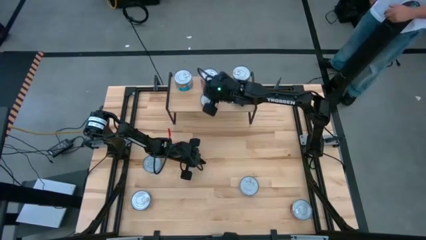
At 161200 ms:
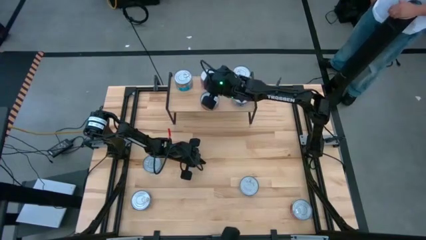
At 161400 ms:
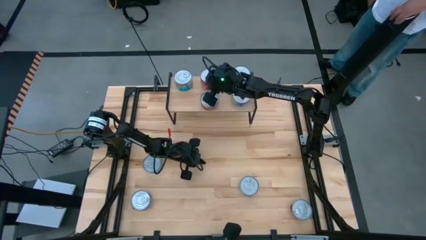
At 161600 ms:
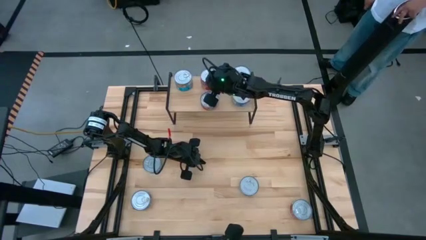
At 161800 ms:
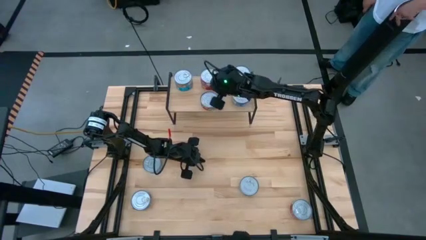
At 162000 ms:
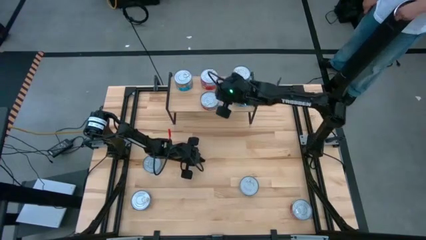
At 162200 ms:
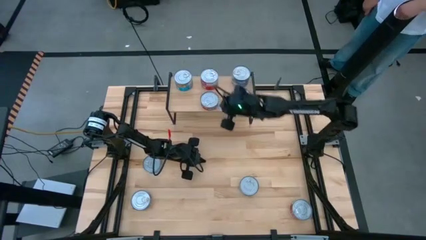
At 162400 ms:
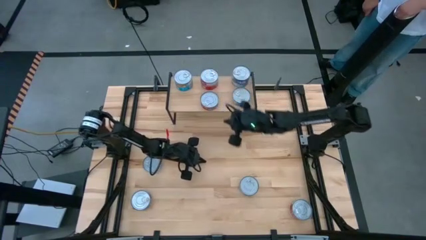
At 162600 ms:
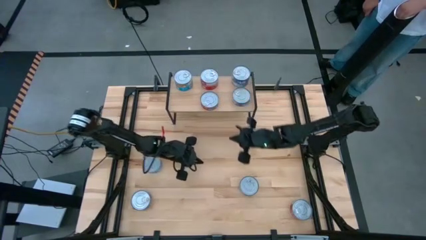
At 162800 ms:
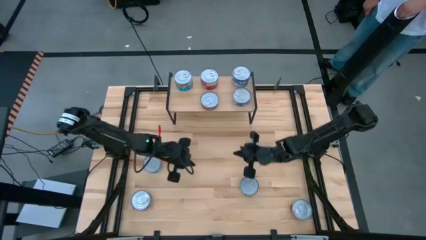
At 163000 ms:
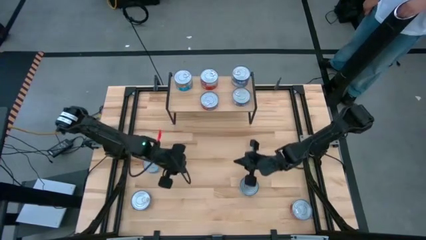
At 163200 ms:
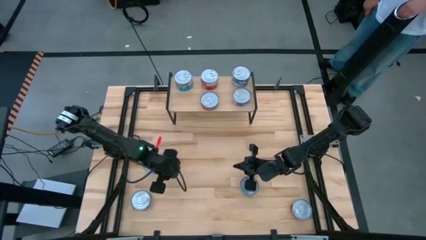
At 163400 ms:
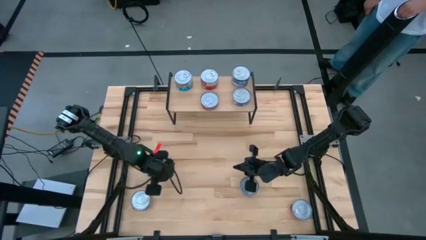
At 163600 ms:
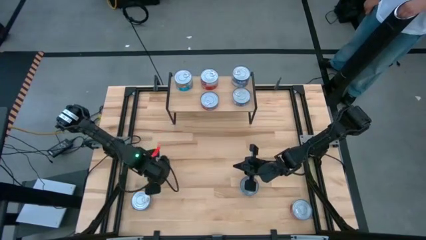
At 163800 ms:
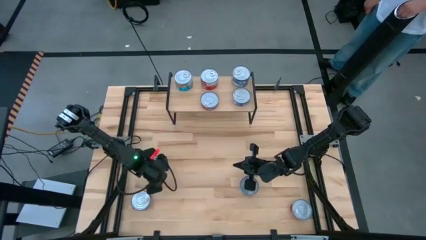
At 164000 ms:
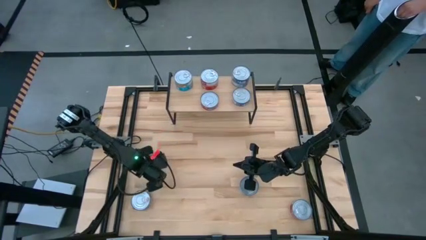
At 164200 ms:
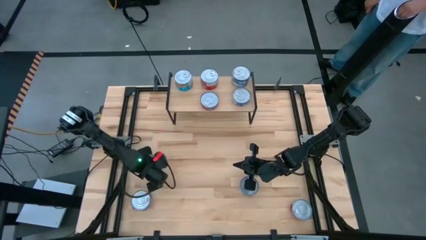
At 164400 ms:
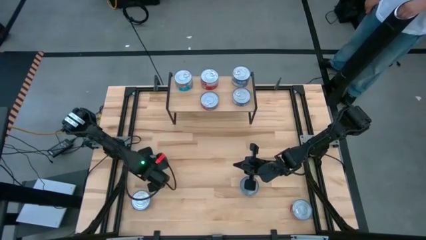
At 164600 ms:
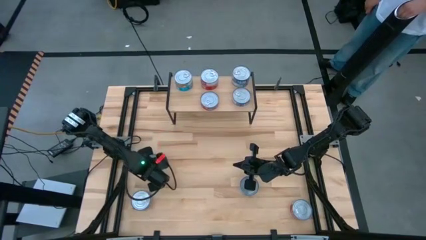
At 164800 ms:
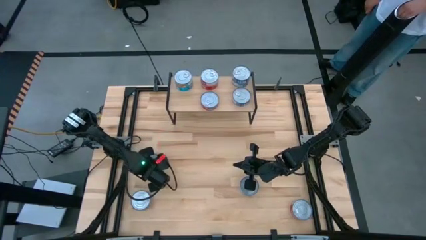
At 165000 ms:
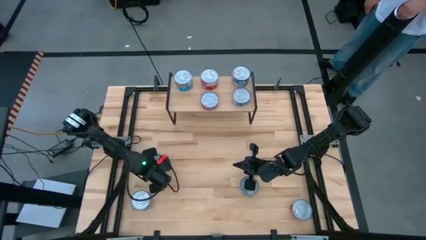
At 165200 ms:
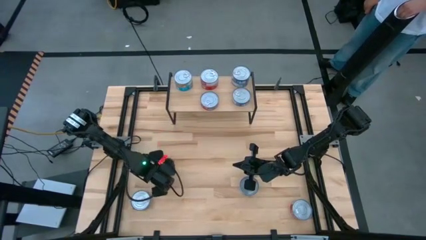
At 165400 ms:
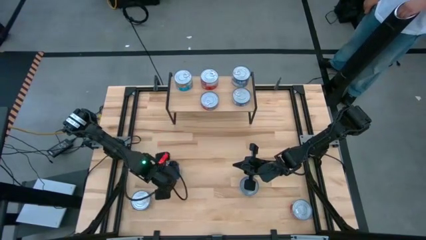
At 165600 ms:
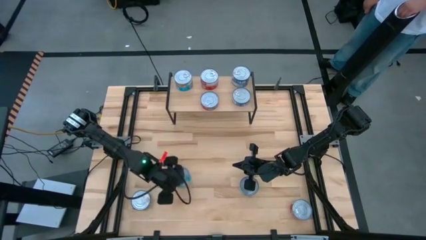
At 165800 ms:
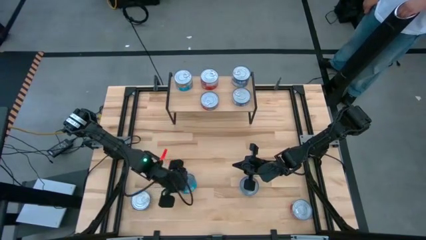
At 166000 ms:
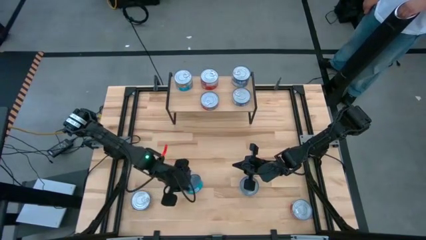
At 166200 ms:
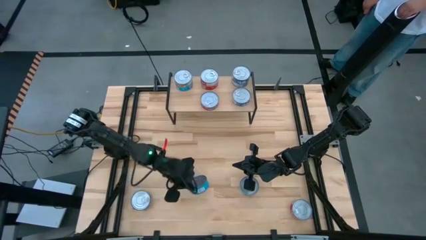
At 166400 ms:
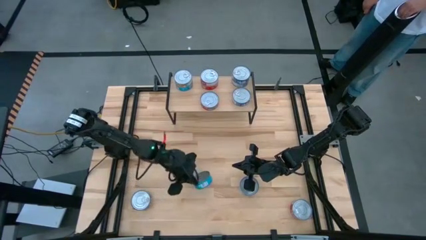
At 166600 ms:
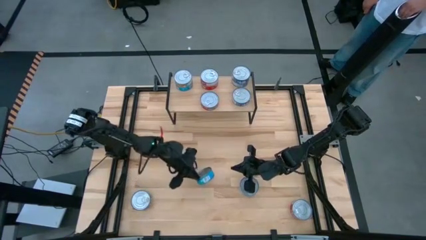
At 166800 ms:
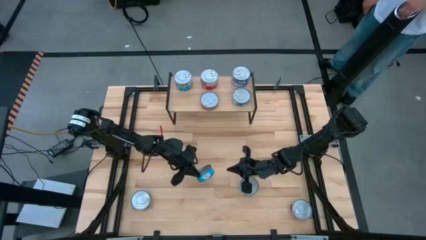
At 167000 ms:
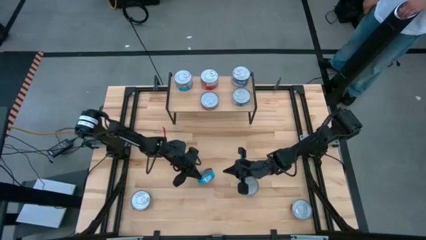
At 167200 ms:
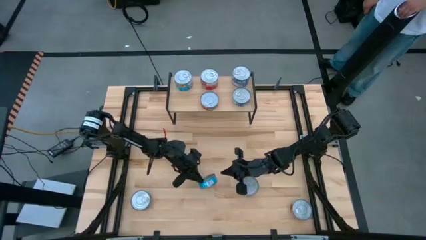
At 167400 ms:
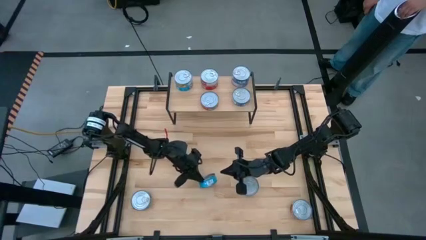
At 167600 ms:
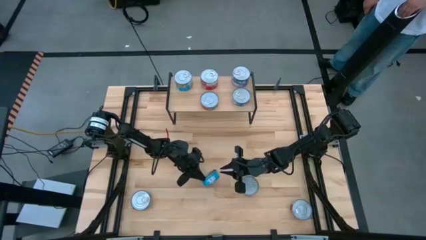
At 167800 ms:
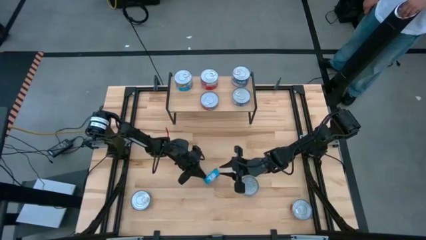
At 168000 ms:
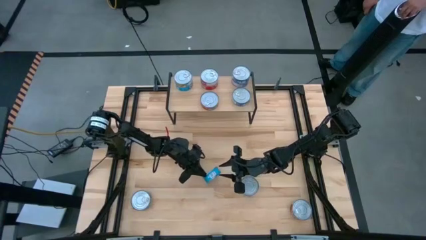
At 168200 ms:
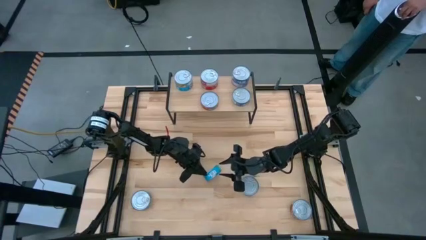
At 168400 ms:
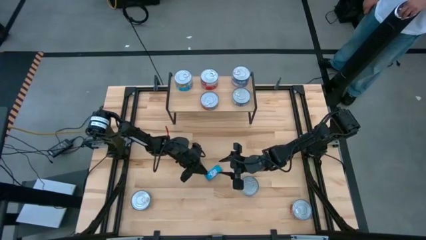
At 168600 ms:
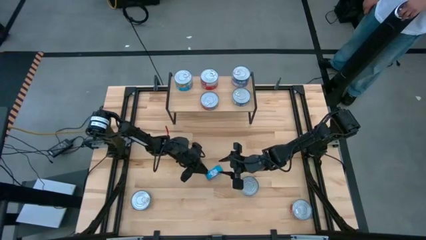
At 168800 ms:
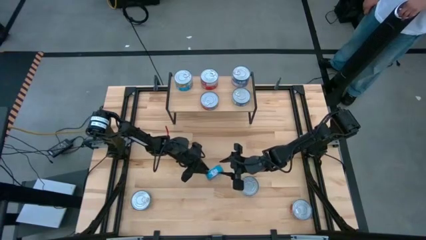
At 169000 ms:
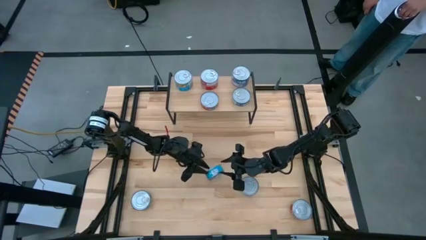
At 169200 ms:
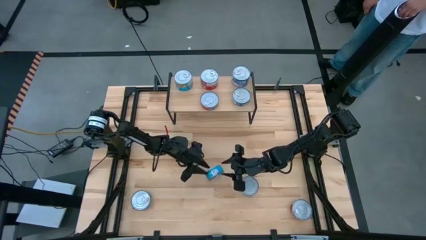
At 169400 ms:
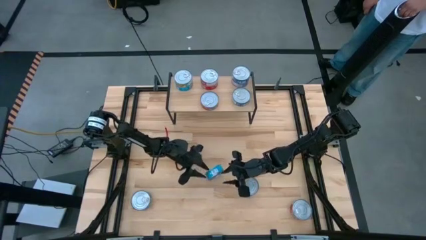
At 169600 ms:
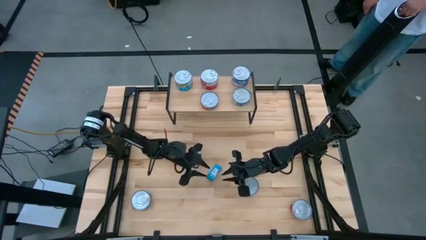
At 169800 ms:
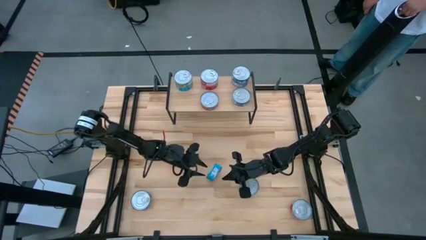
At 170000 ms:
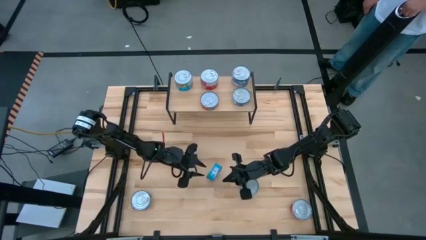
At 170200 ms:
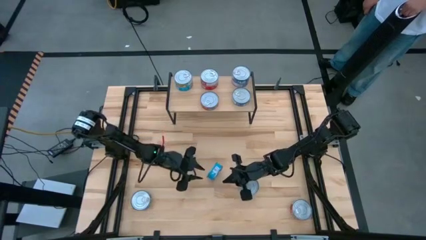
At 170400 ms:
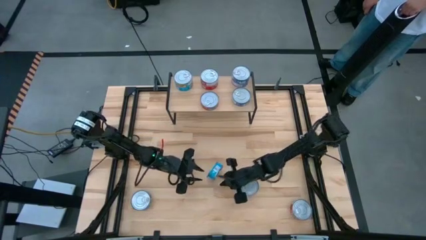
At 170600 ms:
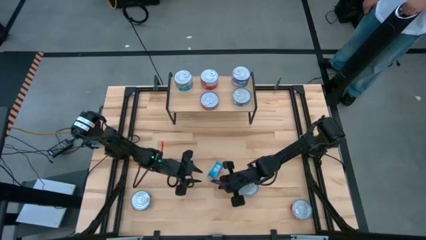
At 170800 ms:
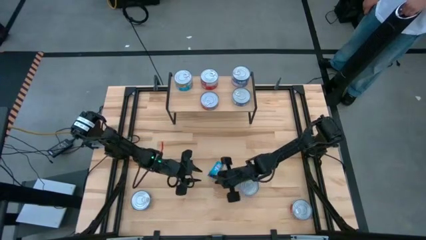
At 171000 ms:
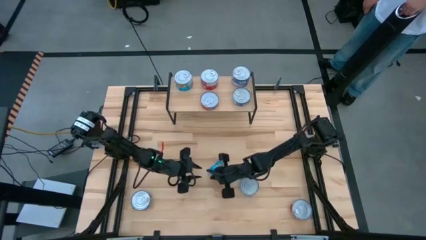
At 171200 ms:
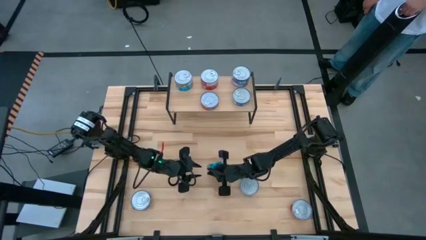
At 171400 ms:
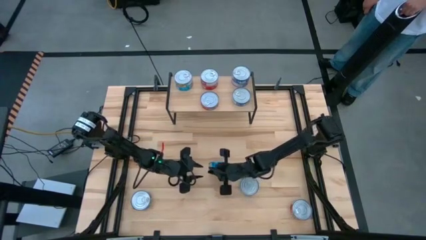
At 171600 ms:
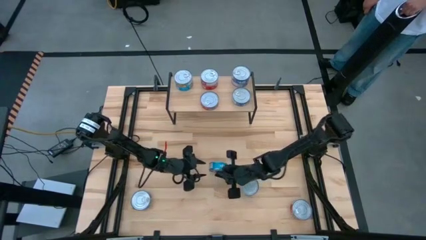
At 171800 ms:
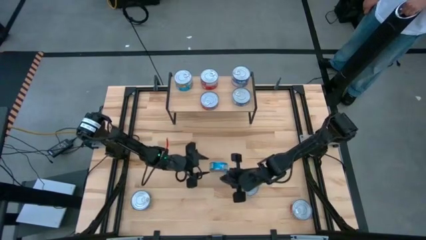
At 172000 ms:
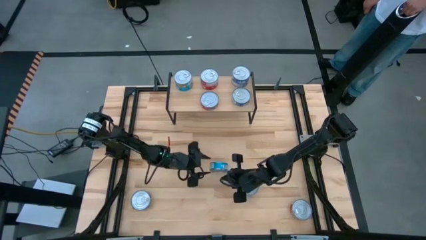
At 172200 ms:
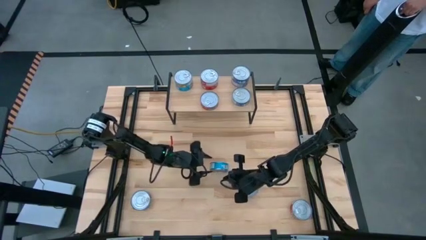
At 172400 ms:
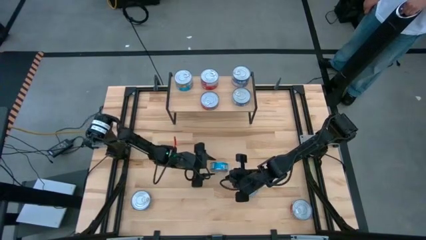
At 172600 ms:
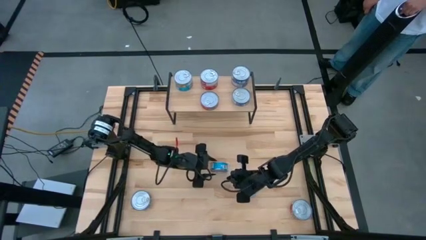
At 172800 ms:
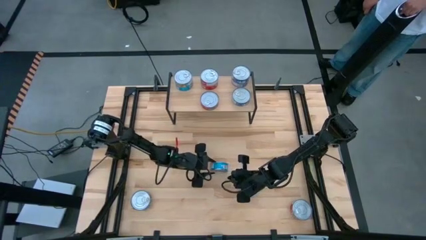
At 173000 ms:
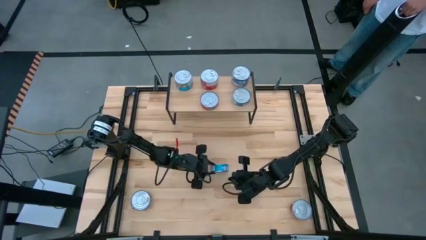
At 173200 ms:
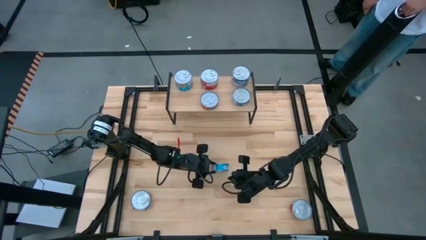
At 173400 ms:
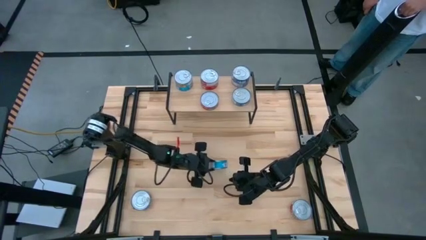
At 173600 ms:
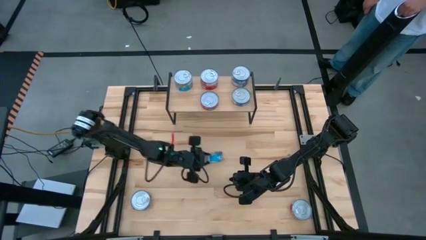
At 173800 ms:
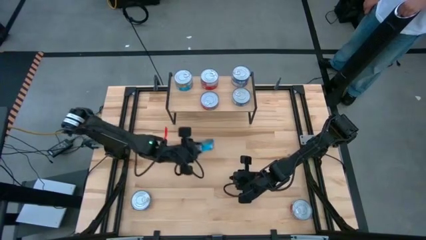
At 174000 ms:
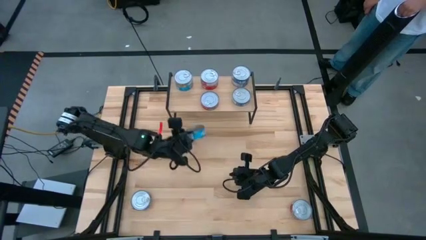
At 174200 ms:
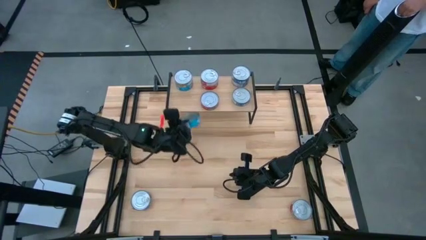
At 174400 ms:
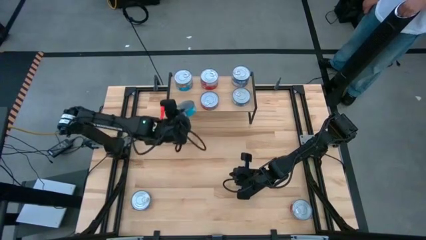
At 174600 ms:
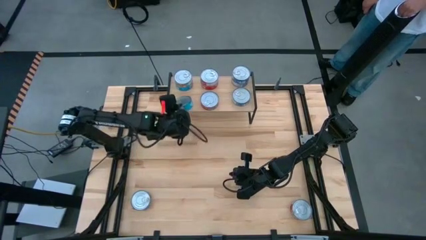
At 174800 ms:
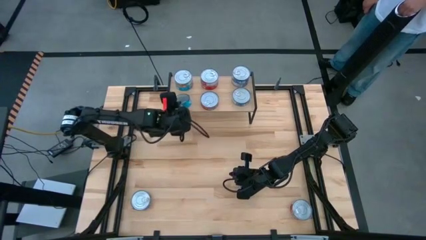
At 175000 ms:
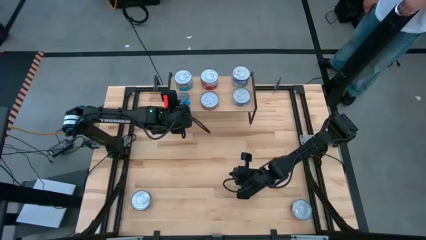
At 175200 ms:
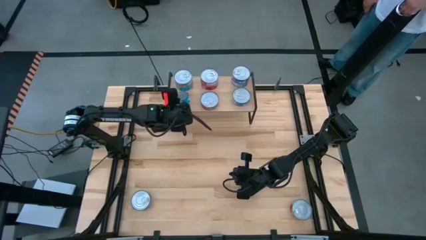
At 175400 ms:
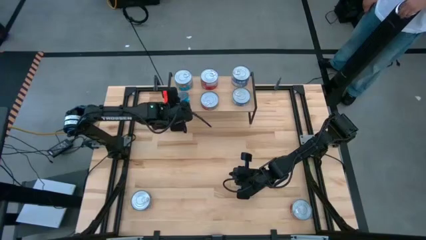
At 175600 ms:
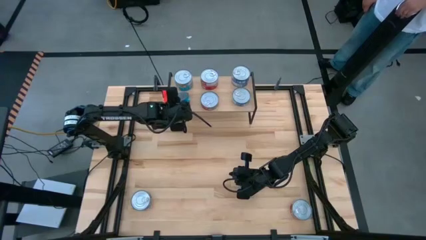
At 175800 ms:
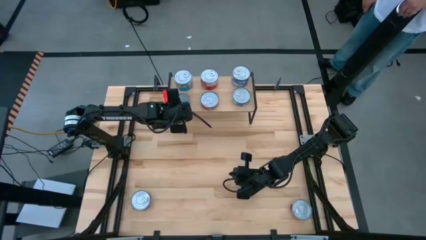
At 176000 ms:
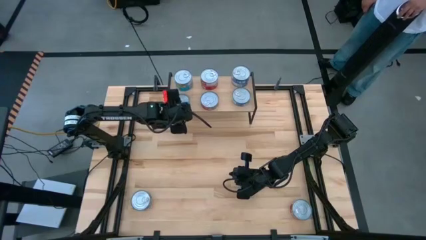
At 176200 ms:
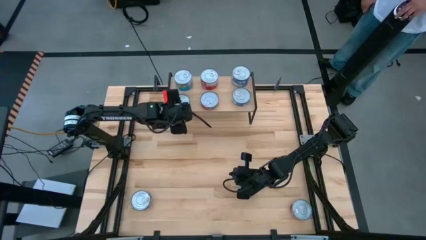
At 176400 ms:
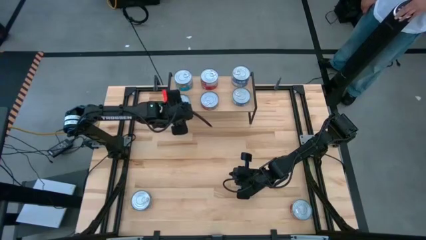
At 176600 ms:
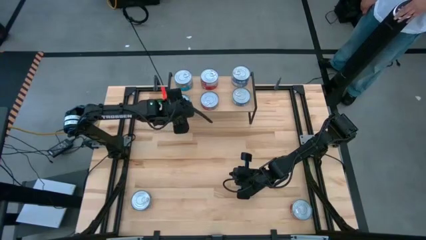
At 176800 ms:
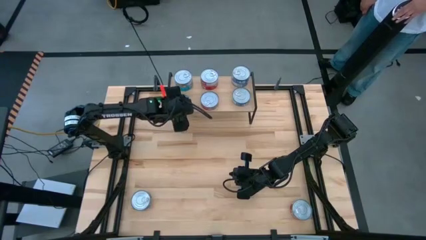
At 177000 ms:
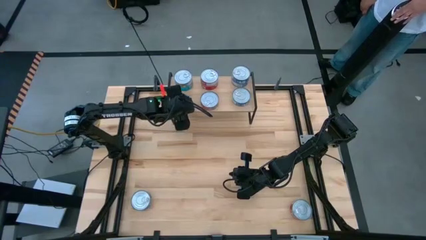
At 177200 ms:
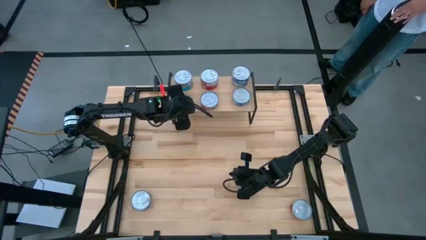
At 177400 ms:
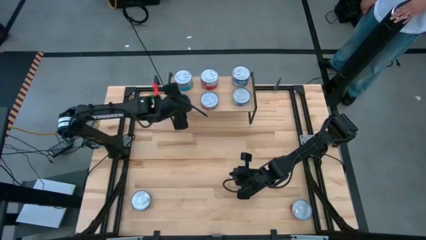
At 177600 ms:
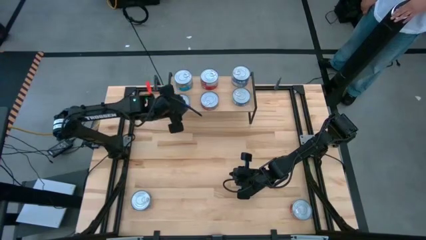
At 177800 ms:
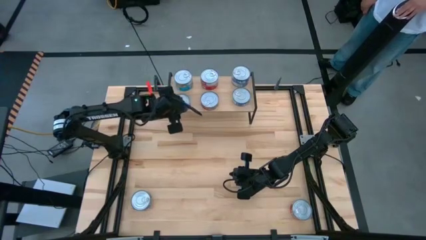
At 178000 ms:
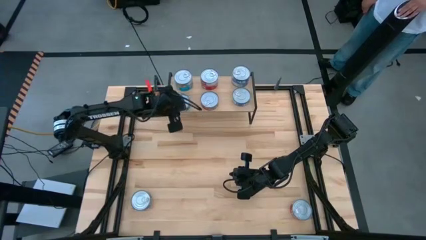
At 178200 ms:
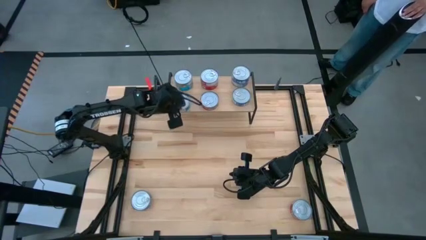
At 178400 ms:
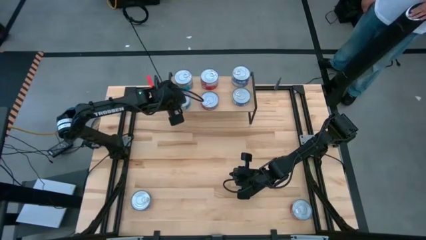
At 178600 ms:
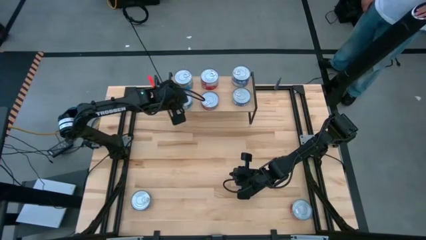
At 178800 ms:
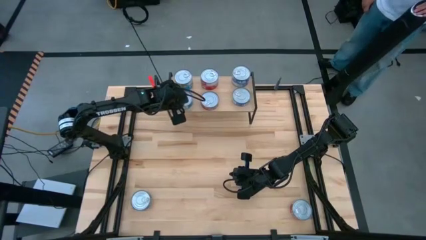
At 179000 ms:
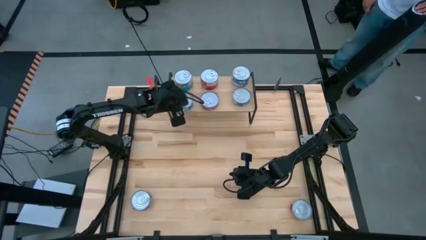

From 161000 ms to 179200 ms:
Task: Stack canned seafood by type on shelf
Put the yellow blue tuna can on the shelf aligned with the other yellow blue tuna can
